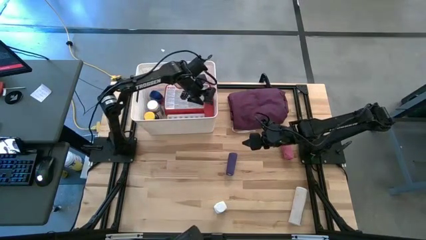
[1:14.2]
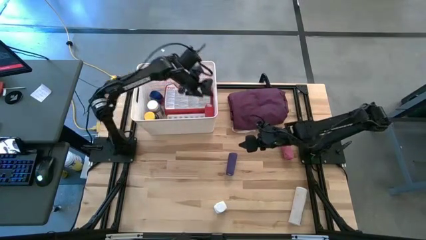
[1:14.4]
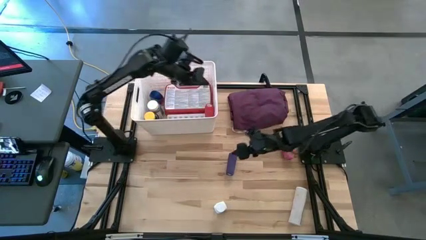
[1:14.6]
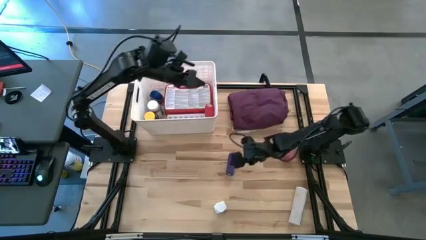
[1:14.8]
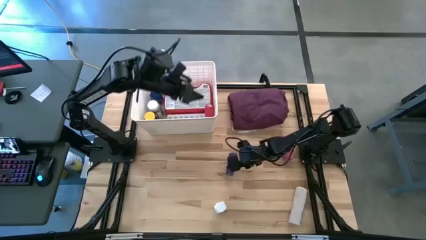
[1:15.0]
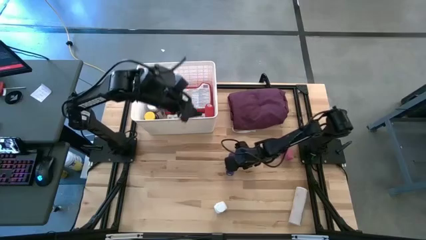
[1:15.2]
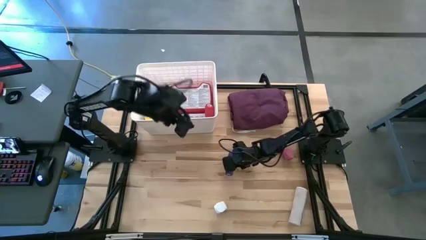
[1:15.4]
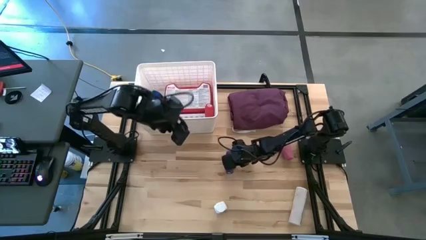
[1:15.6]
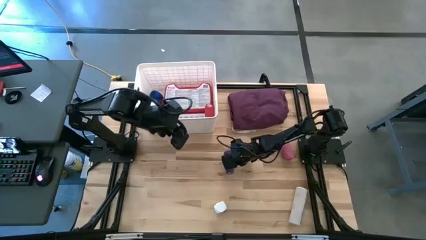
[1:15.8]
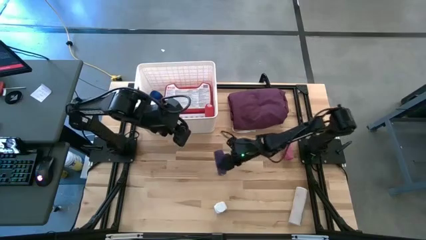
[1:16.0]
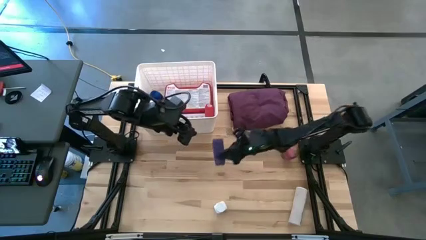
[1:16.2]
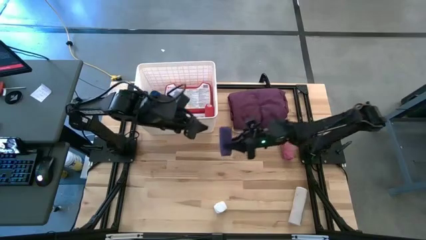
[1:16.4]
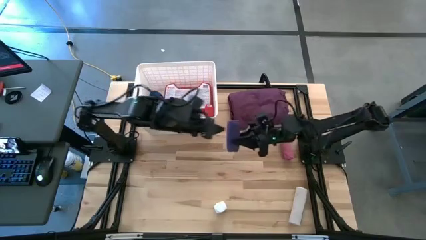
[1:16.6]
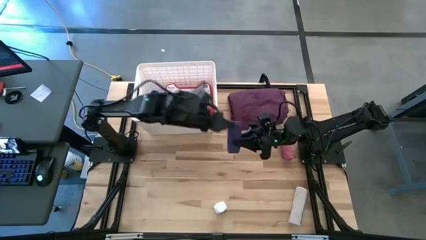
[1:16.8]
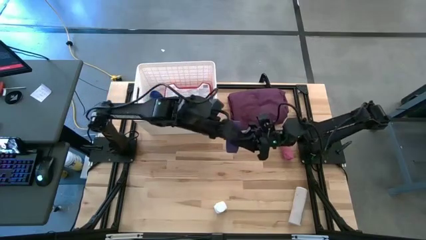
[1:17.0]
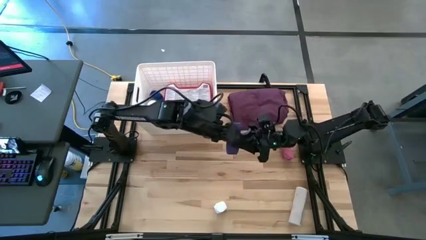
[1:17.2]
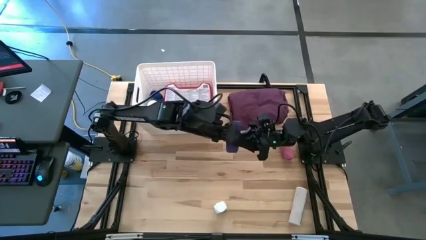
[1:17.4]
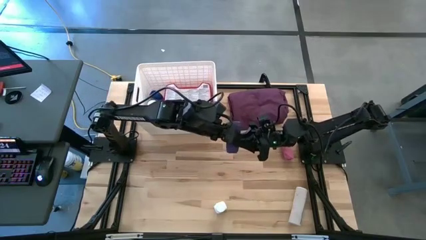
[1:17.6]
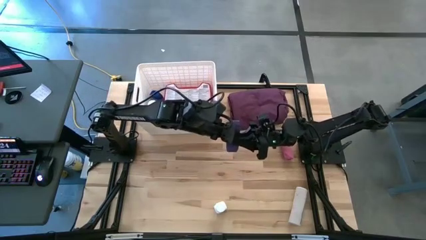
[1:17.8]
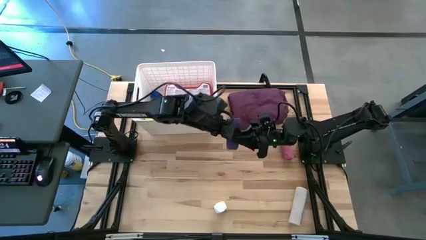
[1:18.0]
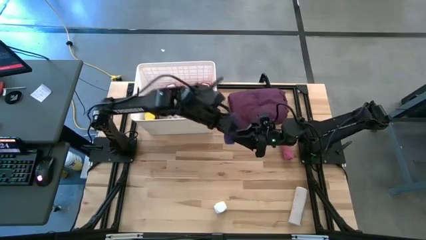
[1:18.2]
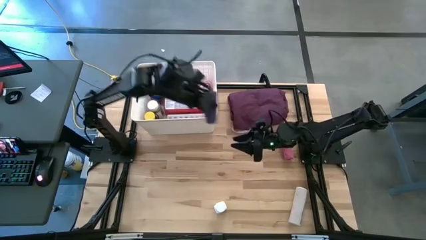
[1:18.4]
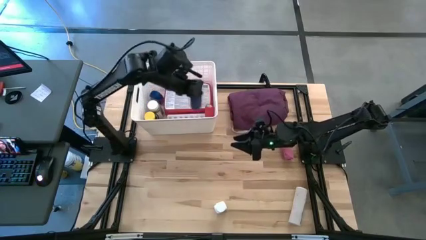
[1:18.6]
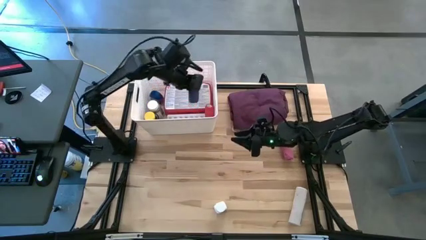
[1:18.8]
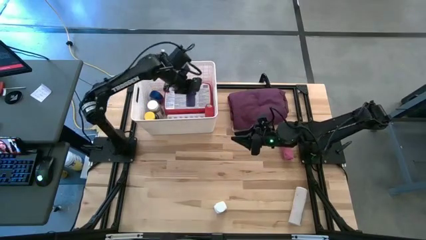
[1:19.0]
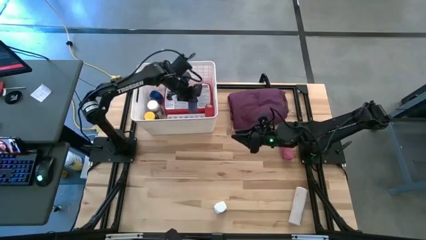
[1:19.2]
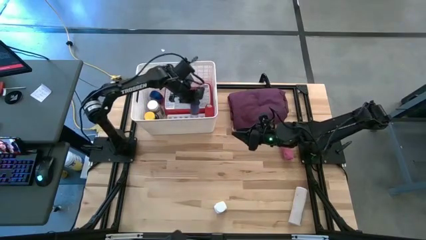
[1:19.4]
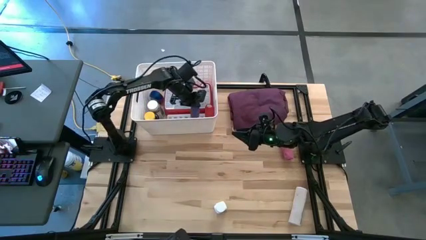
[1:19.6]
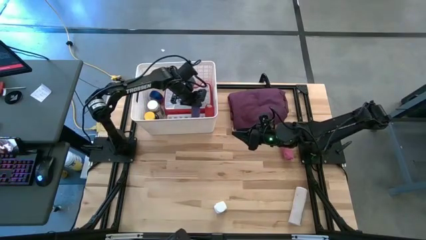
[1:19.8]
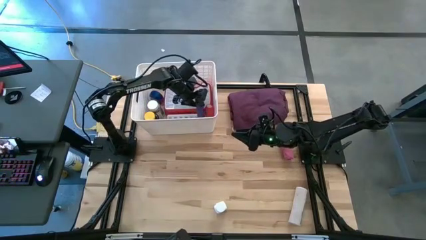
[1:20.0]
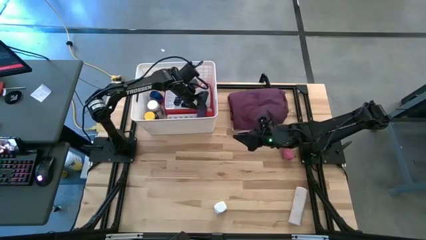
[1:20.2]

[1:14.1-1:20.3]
Task: Pick & place medical supplies in basket/bin
Put the blue bandage into the white bin

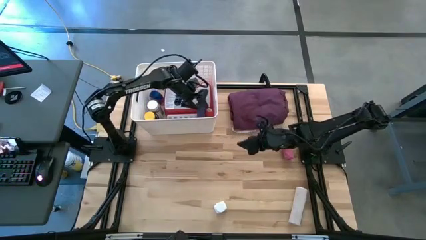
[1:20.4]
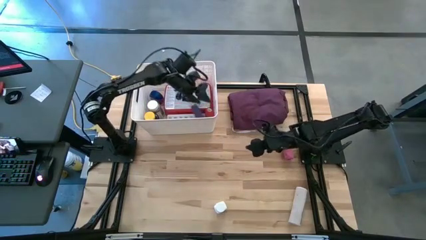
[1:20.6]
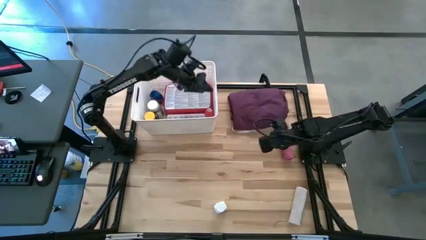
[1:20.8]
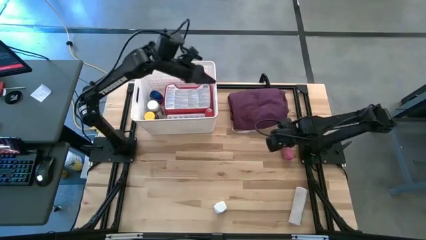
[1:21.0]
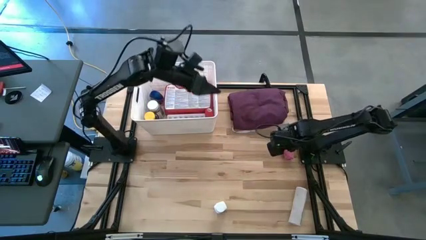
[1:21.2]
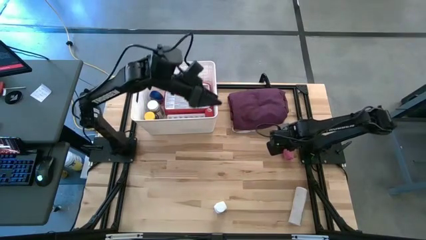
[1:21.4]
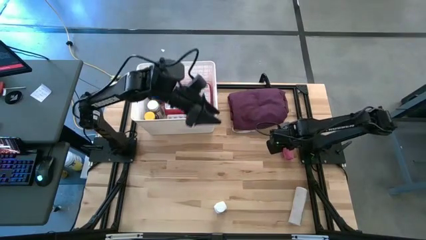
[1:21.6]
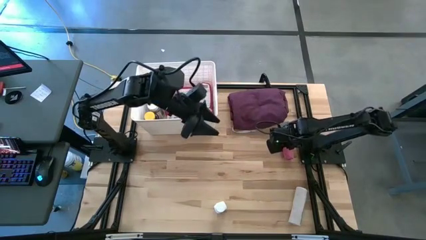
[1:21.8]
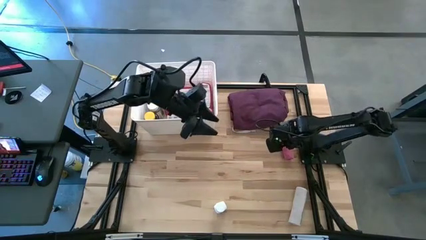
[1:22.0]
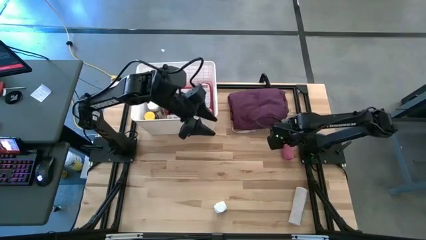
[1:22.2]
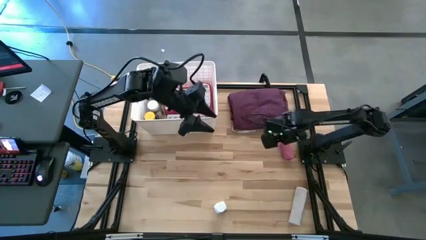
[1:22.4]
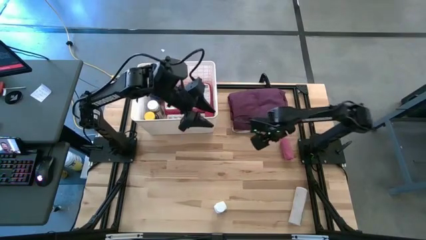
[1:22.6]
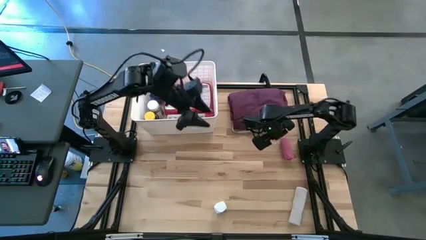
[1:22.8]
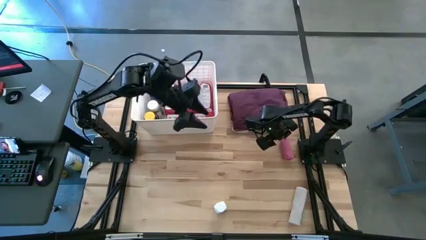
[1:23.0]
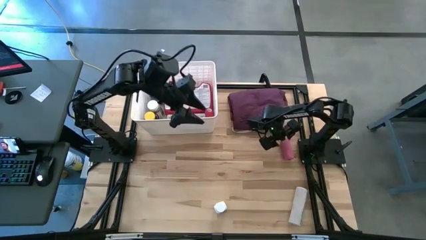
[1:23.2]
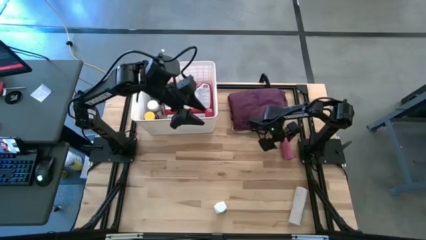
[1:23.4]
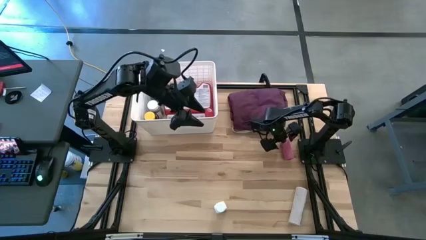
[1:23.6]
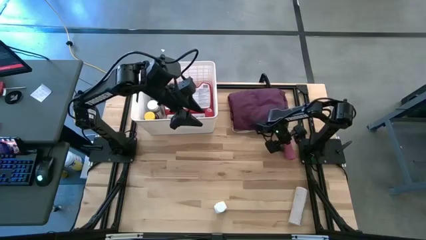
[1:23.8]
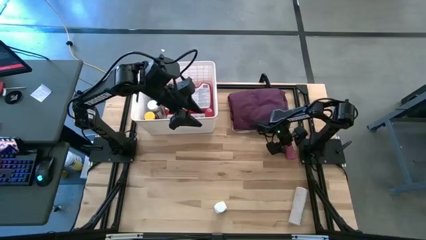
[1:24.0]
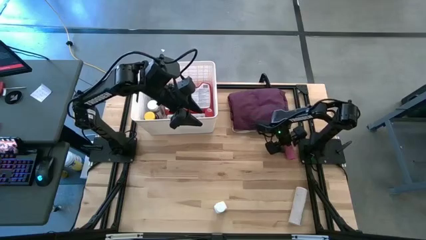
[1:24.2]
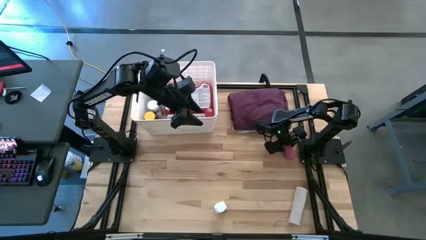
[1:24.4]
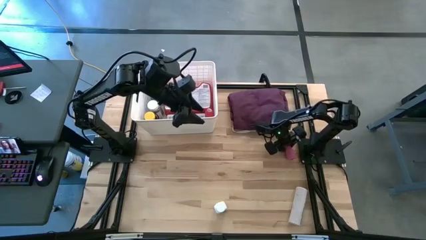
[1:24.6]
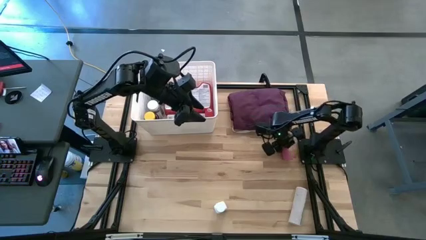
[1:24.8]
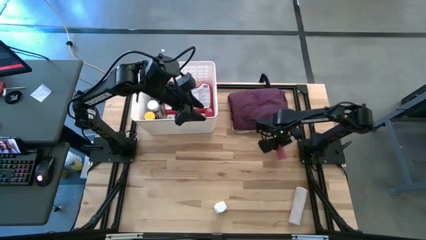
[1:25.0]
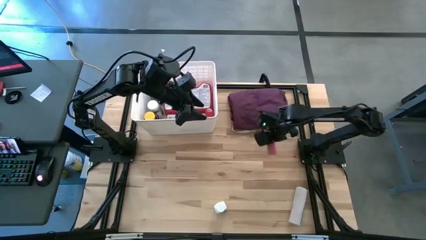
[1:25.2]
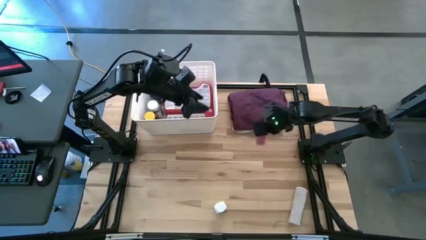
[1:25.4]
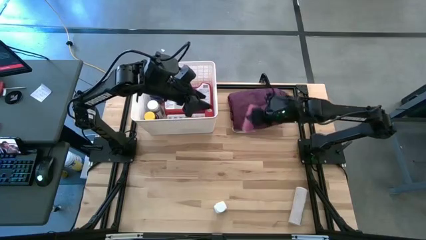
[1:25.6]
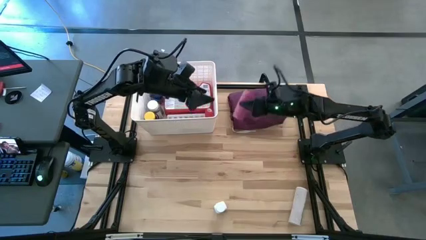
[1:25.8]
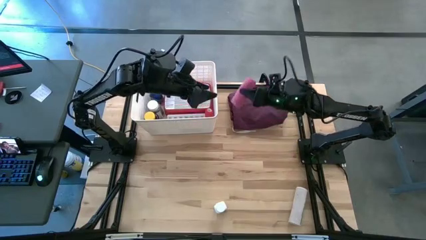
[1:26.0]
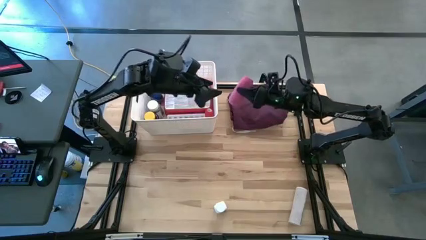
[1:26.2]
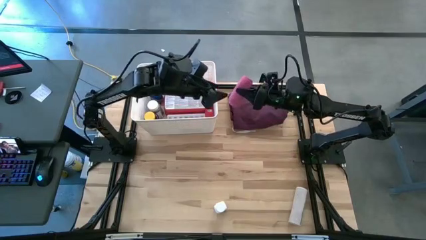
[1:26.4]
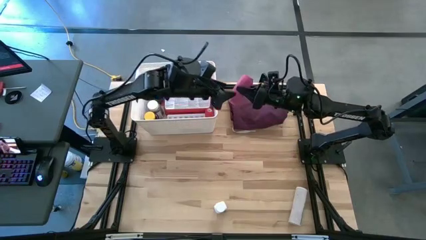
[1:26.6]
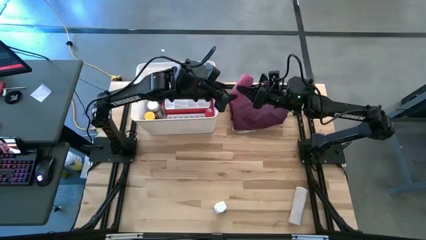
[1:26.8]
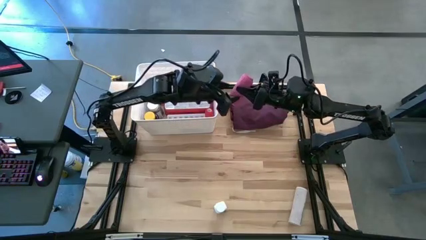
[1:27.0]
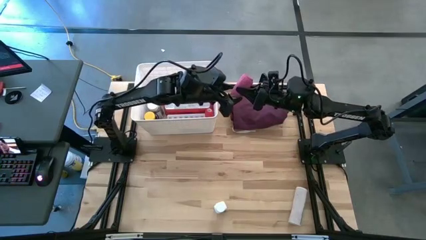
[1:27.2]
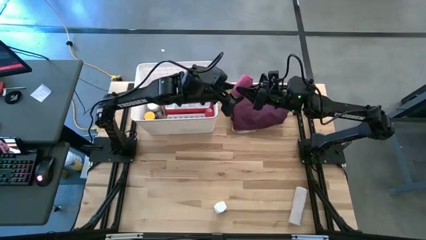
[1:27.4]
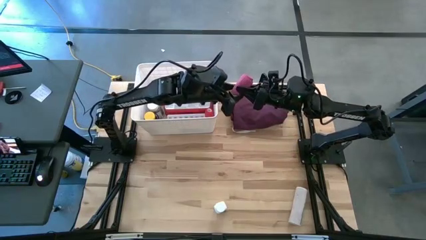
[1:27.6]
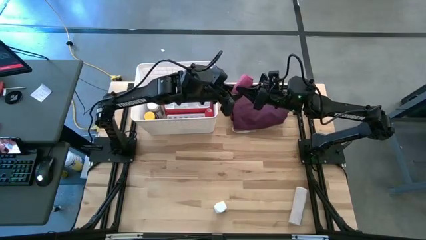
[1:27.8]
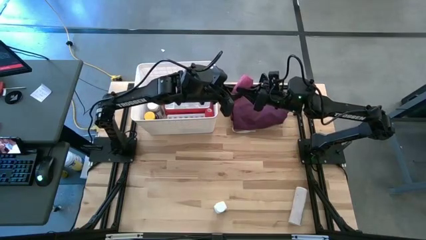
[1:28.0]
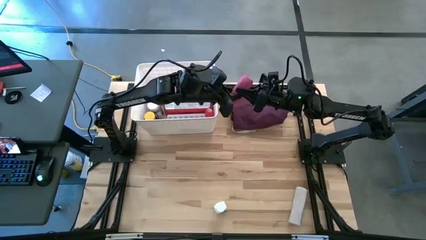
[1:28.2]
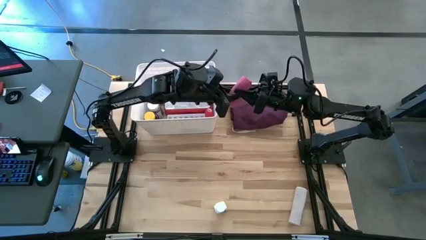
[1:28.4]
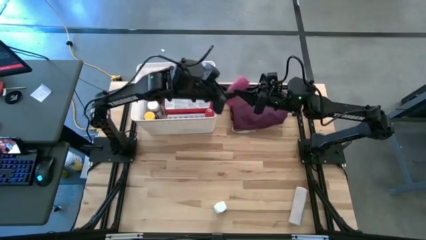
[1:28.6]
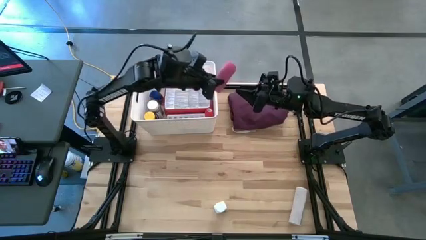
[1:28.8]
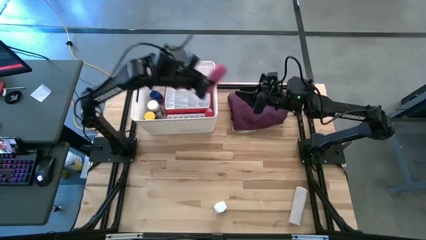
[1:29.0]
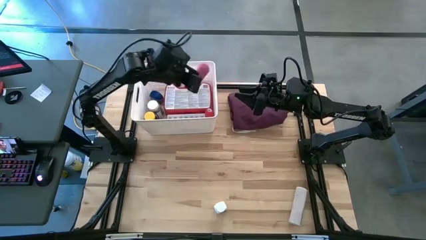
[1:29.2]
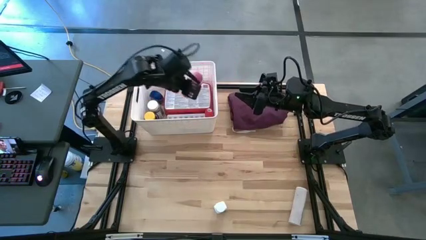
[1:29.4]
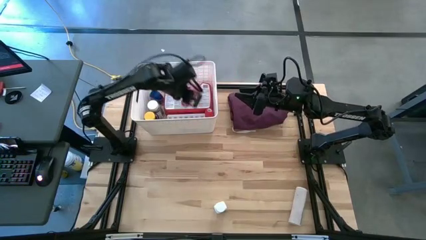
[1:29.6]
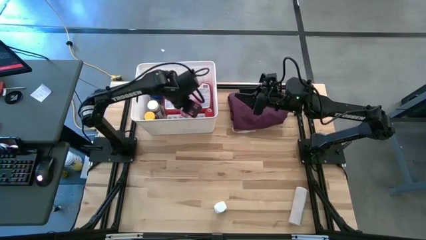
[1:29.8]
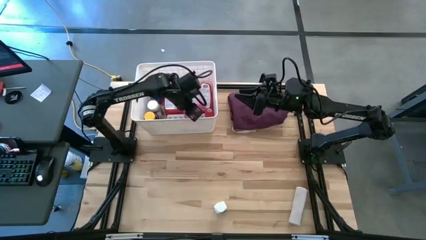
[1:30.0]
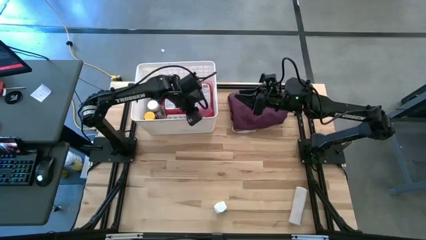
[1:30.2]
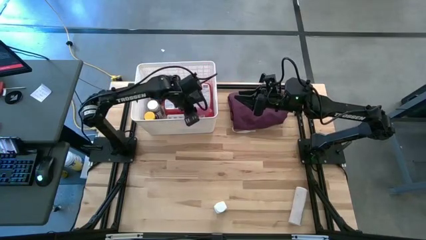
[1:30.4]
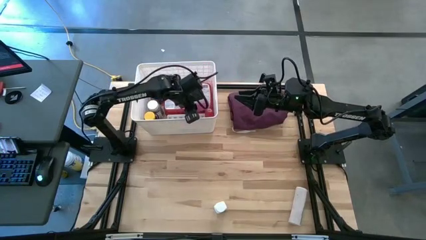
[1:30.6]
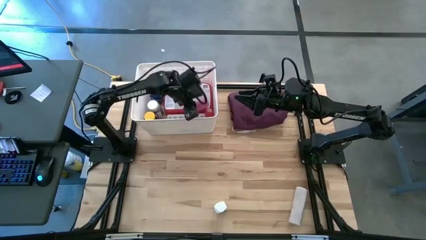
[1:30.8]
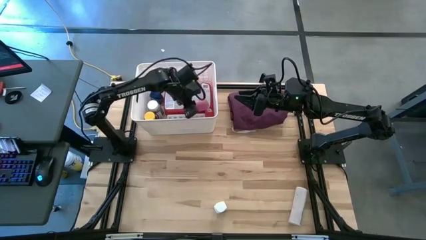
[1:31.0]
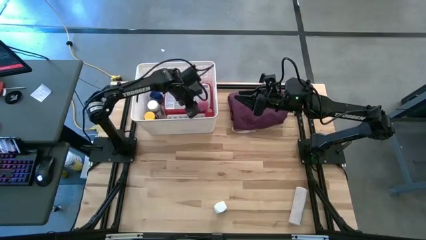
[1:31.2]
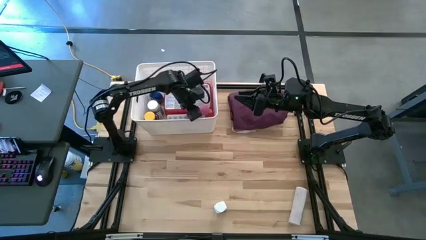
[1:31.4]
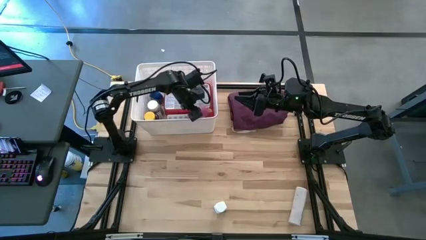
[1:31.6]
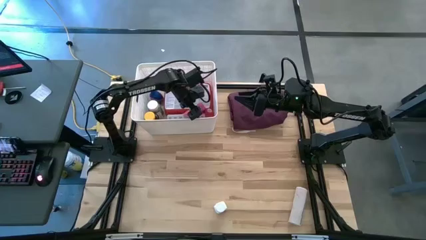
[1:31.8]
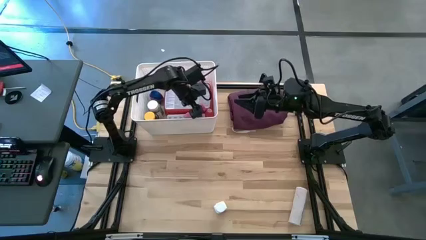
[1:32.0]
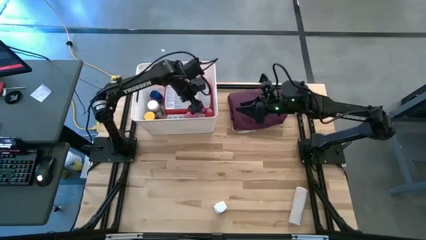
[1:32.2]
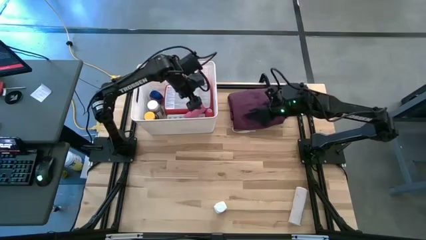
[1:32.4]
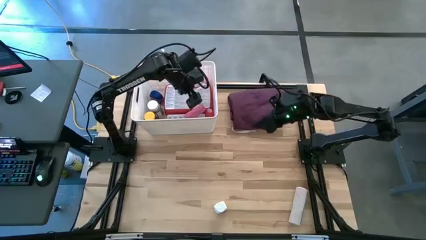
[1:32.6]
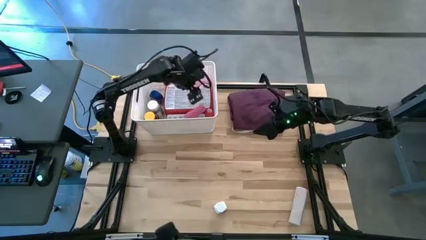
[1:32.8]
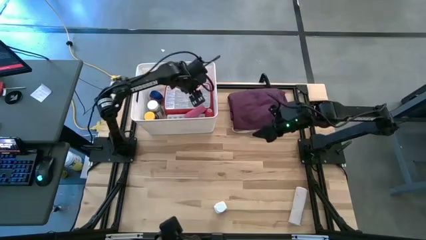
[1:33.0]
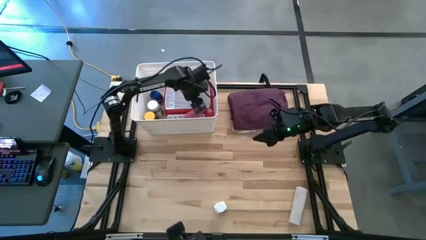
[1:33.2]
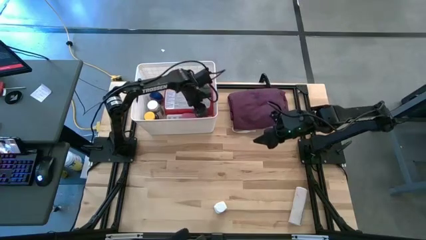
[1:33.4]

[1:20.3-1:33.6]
Put the pink bandage into the white bin
